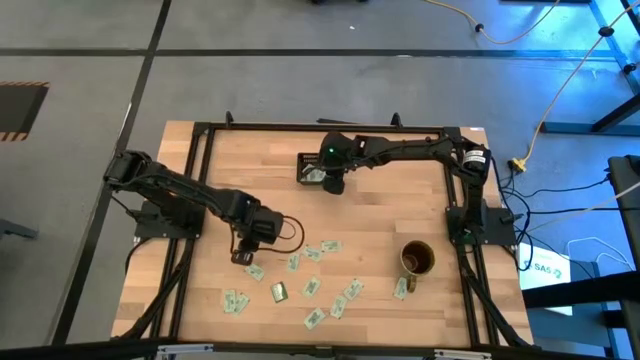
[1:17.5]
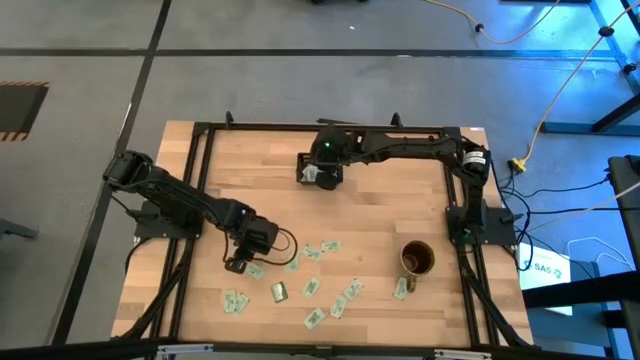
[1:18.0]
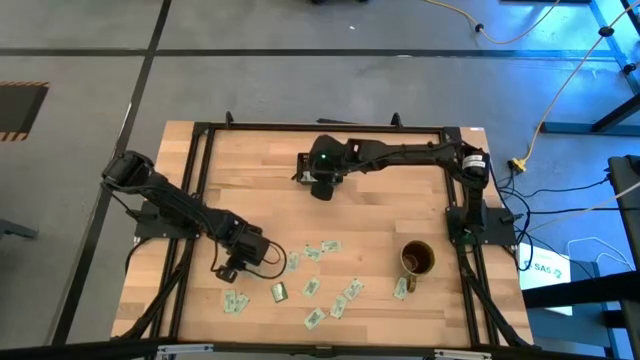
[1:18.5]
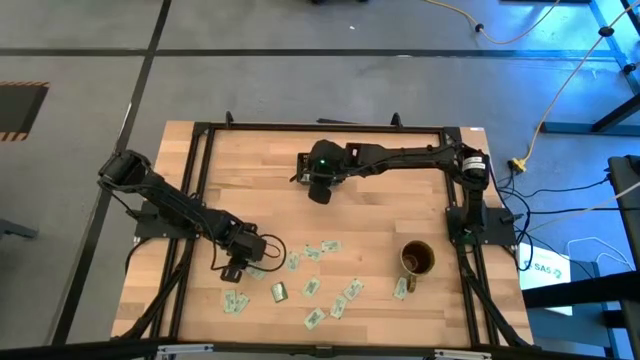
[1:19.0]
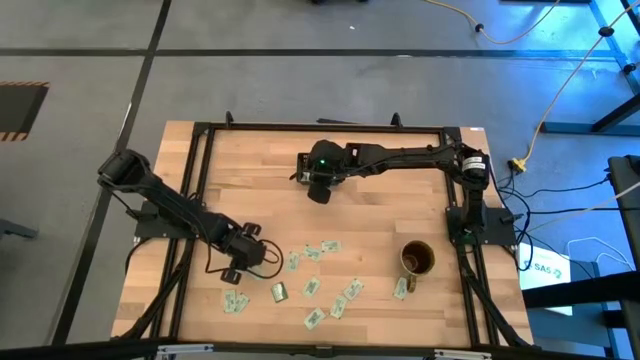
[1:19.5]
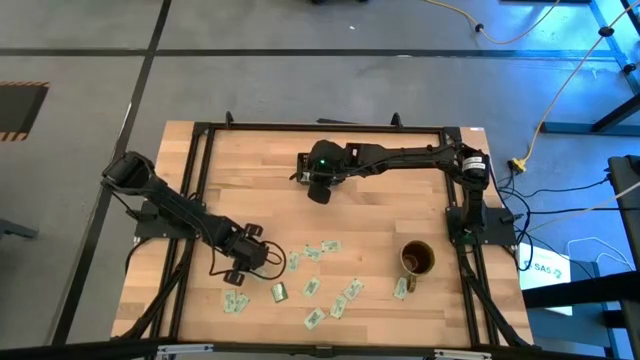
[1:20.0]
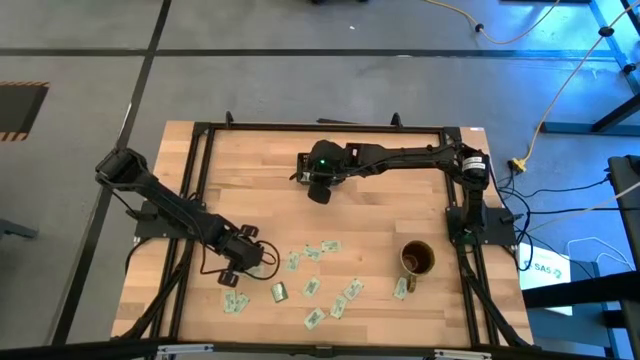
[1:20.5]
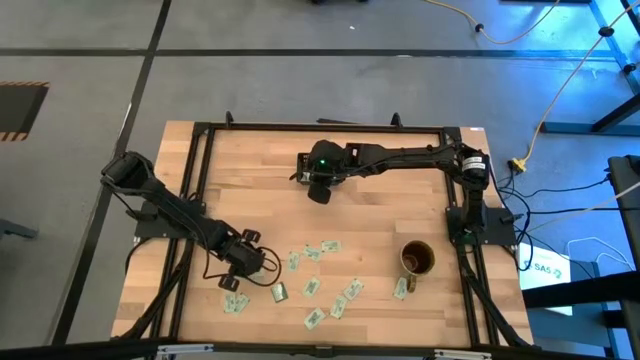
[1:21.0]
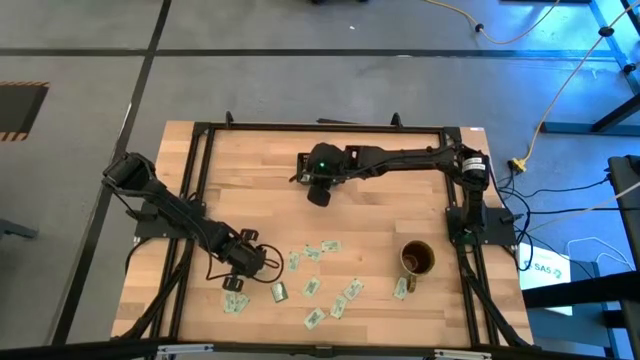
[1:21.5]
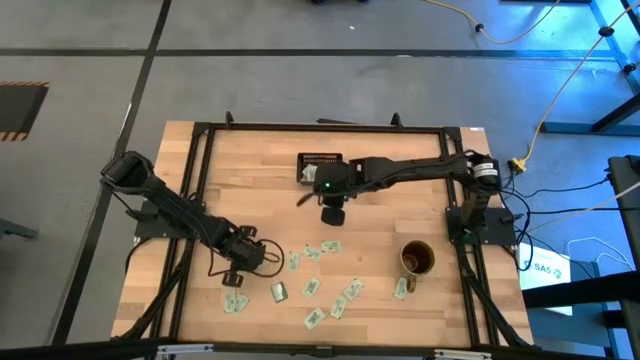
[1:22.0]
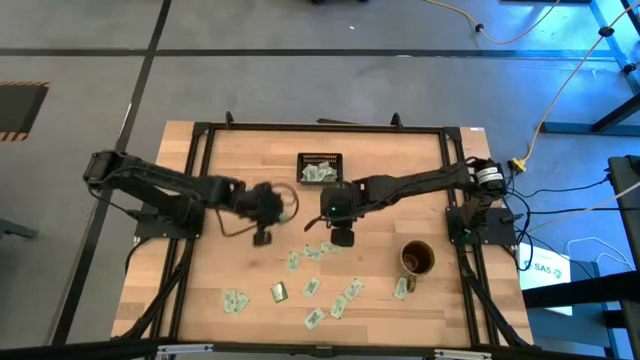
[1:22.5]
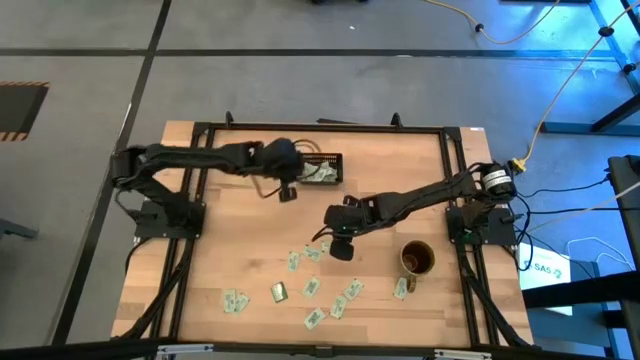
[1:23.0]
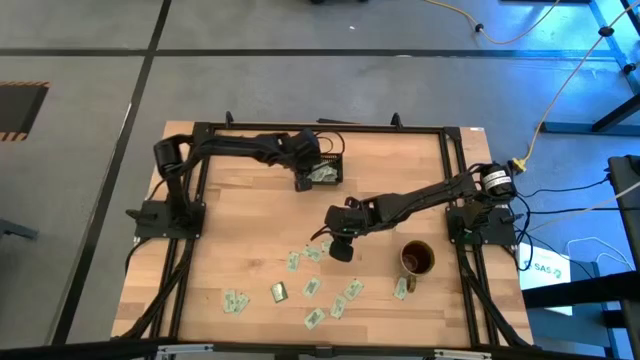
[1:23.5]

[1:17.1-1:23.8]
Task: Pick and place Stevia / Truvia into bins
Put the white stevia packet into the black bin

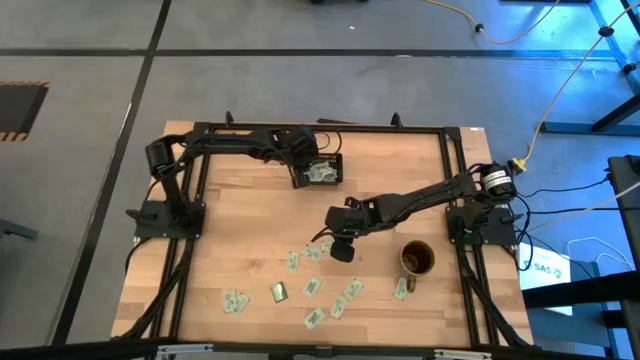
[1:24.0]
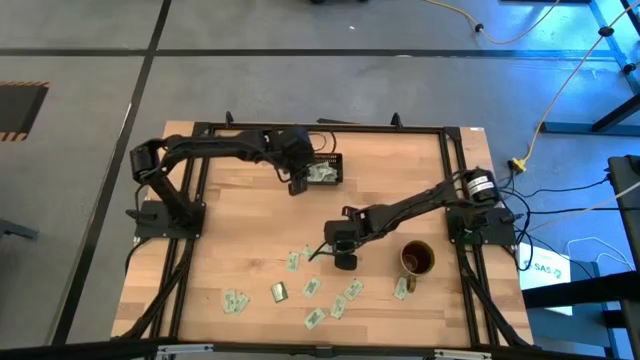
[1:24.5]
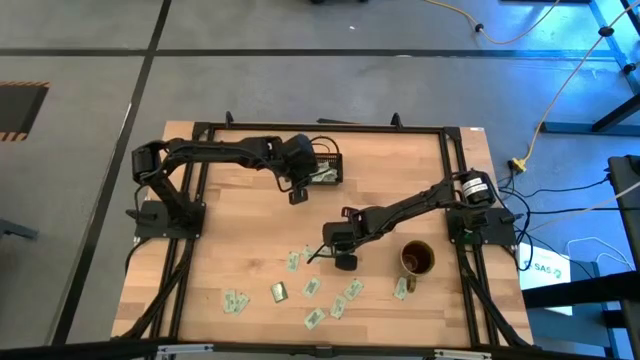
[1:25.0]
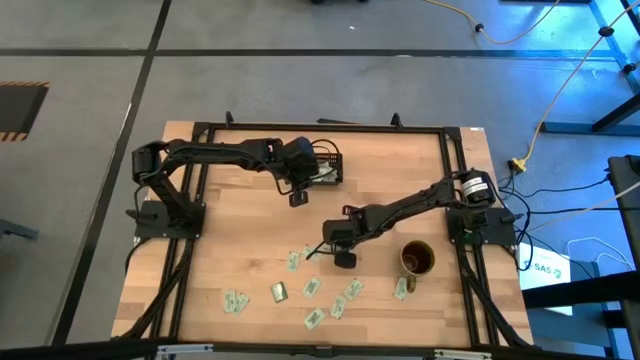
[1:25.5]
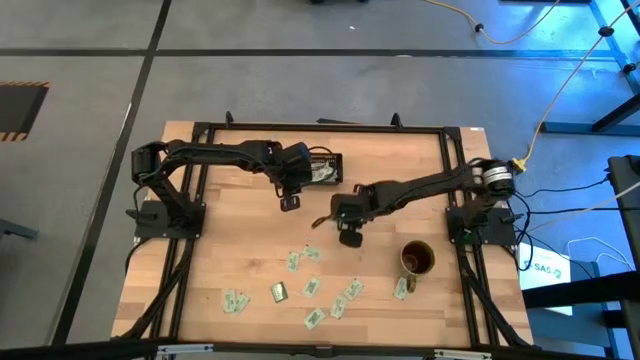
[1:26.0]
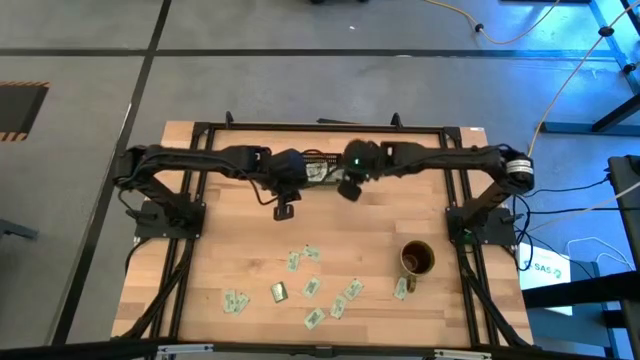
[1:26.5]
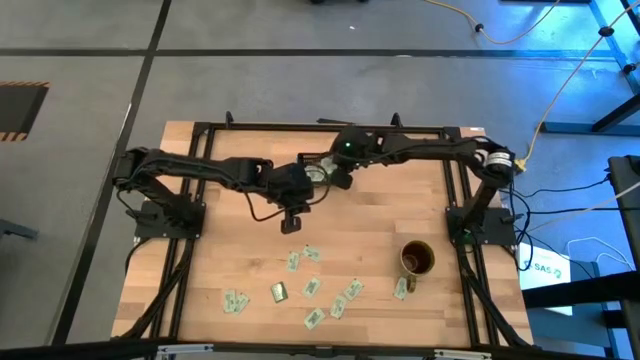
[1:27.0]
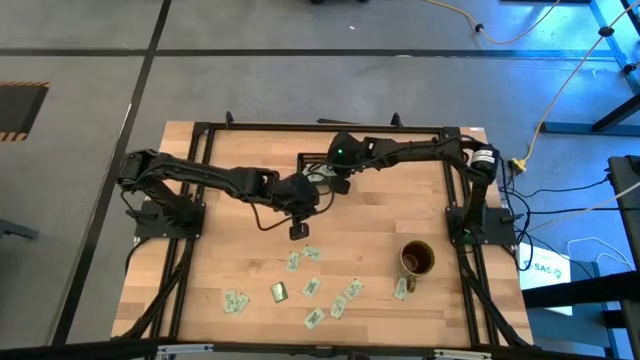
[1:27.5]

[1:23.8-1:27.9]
Put the white stevia packet into the black bin

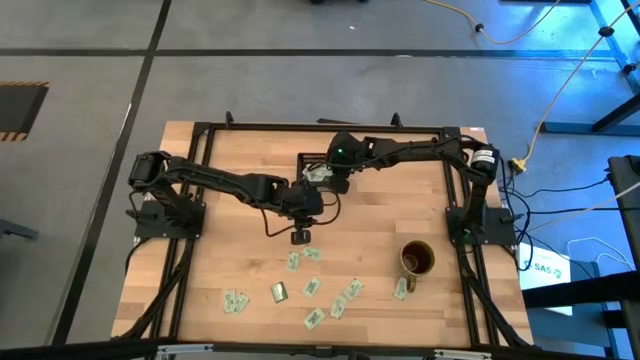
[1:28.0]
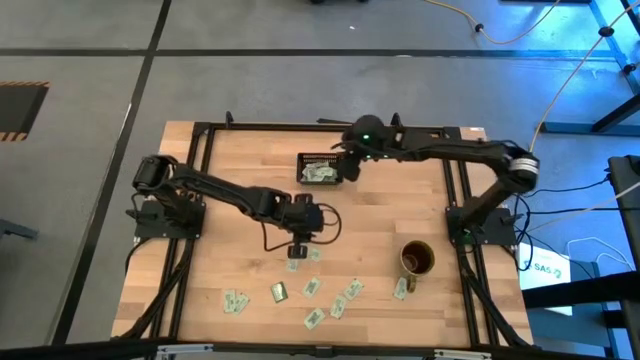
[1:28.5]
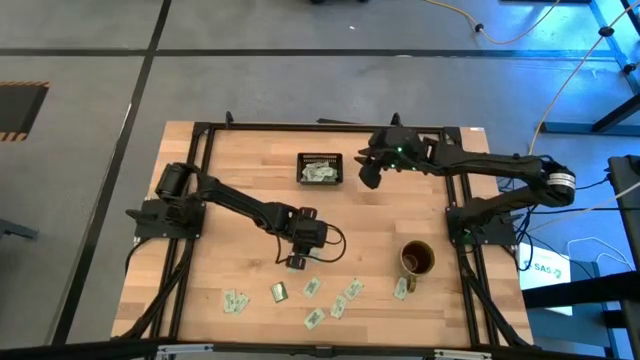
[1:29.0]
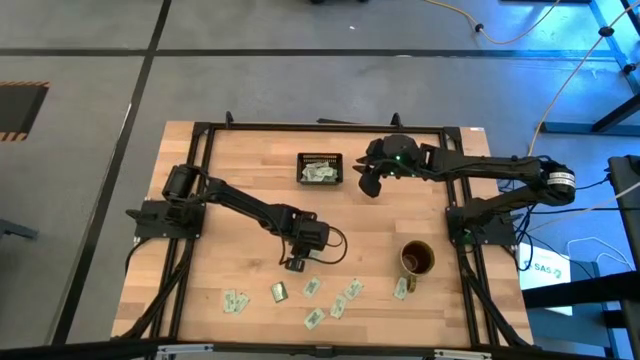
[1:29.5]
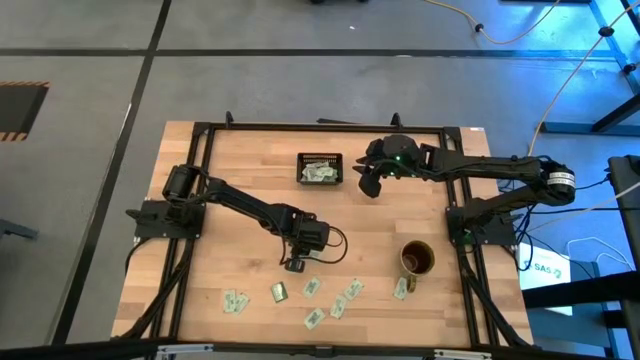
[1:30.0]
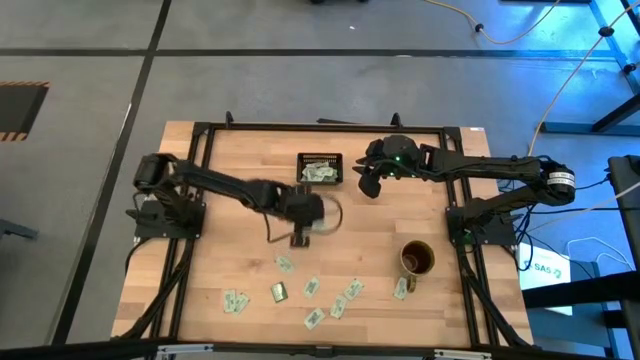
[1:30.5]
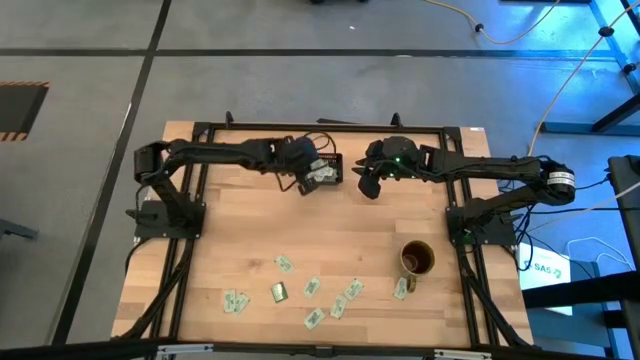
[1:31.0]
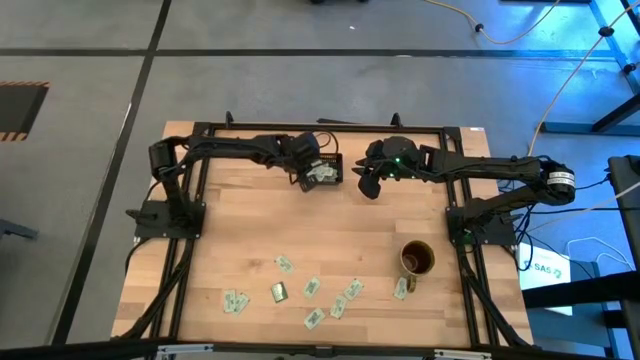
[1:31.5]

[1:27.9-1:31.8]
Put the white stevia packet into the black bin

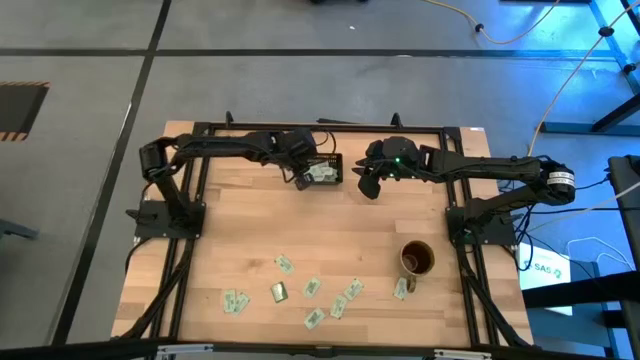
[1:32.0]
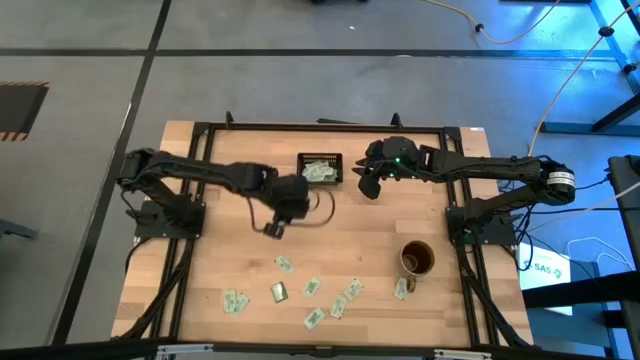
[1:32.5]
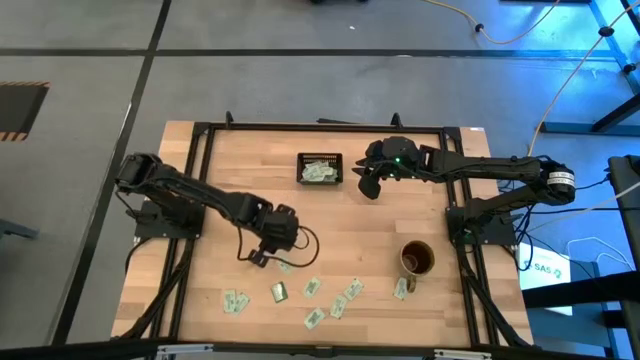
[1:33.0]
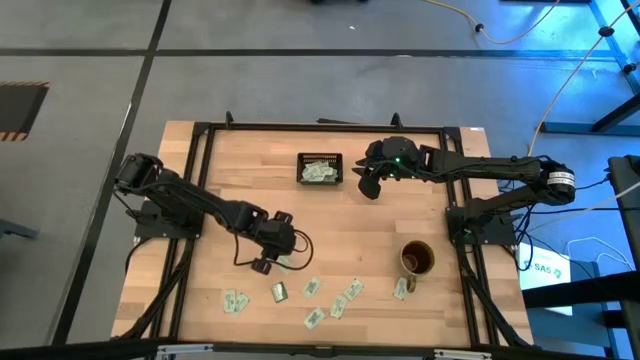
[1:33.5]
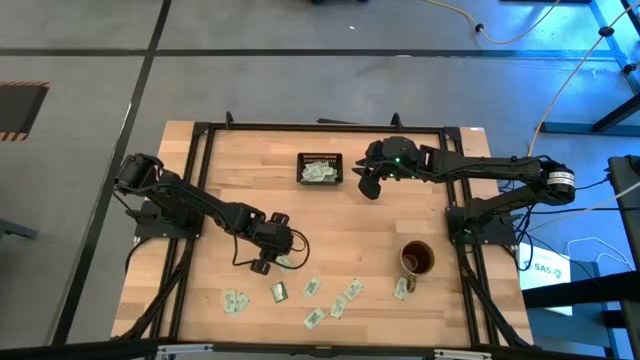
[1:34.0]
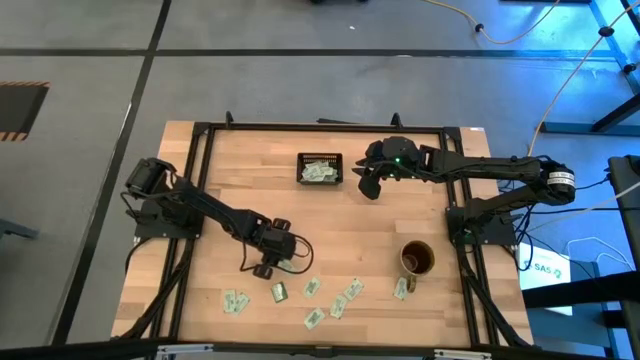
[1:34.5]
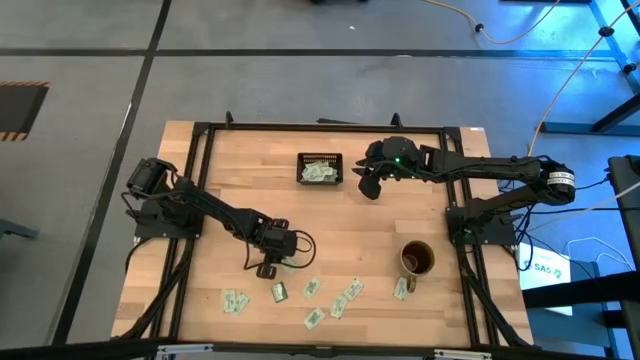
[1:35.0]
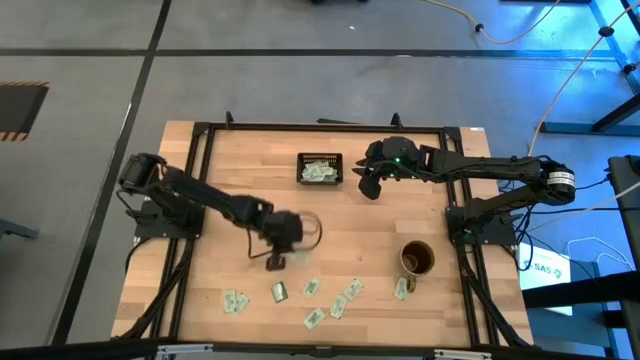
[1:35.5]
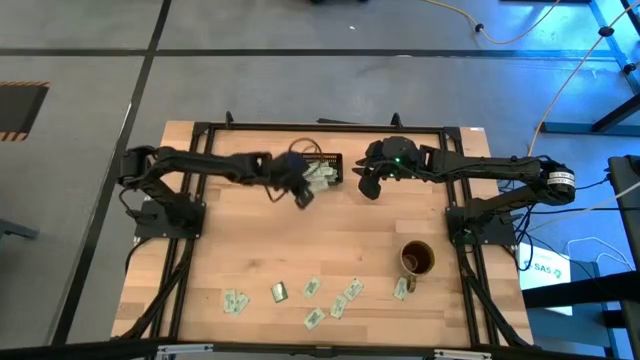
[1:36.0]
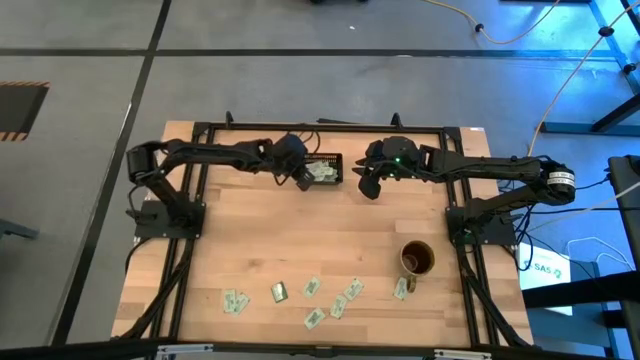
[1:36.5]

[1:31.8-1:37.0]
Put the white stevia packet into the black bin

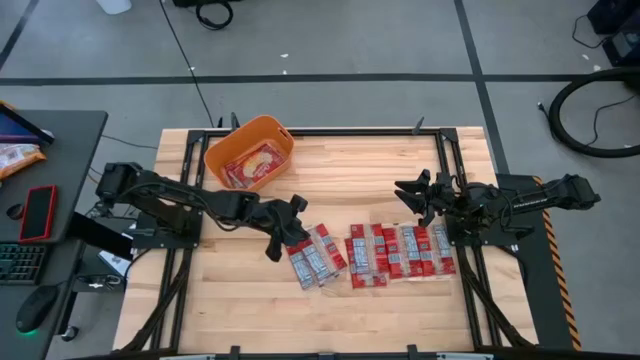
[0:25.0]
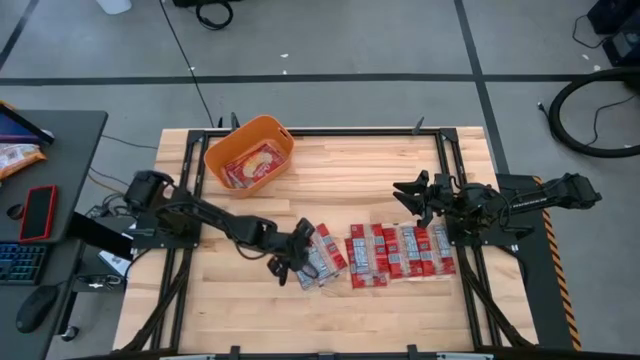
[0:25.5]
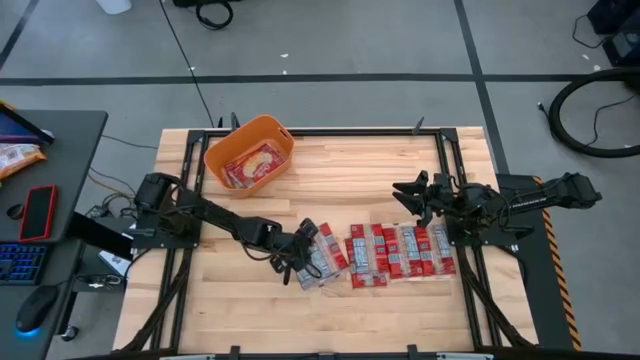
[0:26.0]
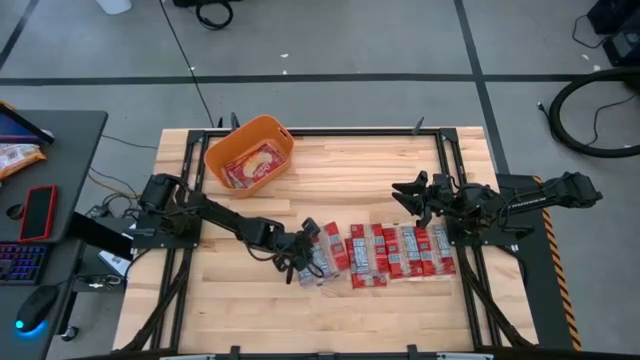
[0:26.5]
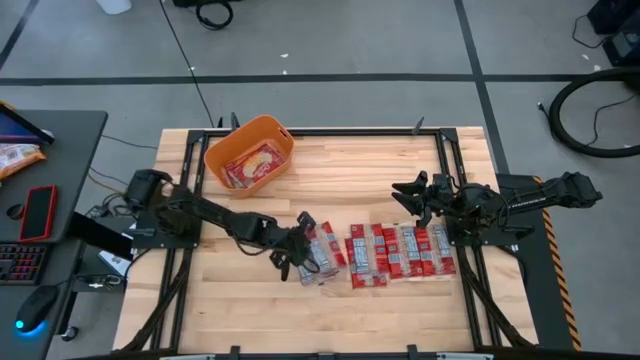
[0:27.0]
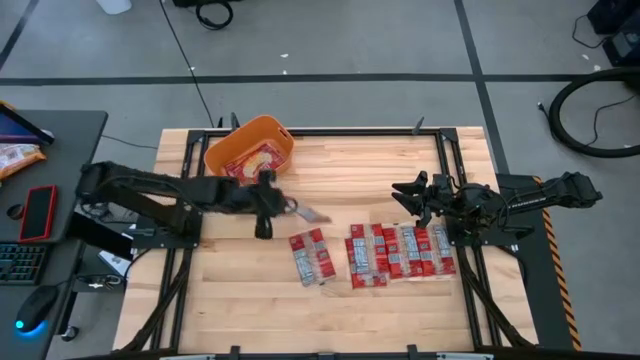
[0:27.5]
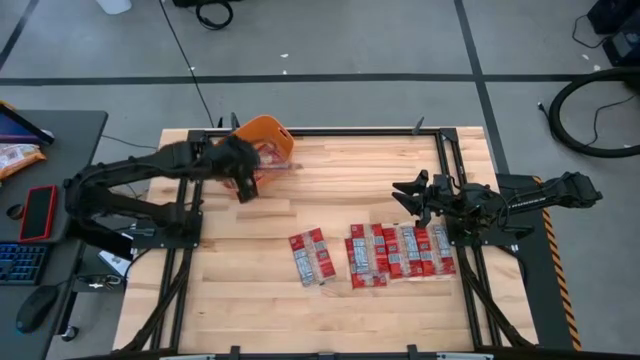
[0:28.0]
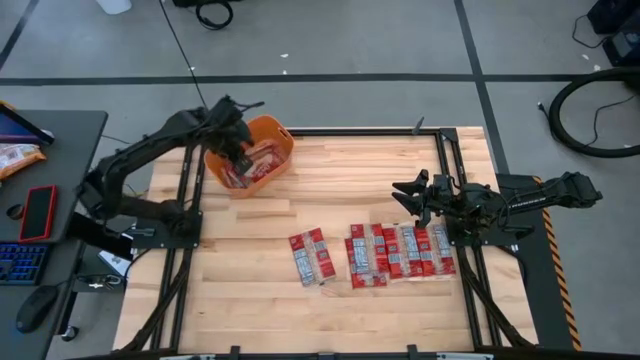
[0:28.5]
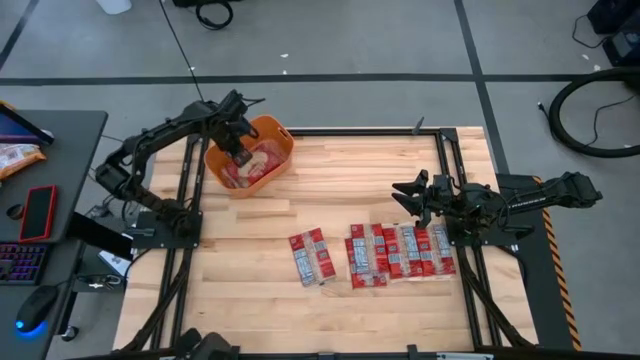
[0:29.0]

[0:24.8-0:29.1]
Task: Sort popcorn bags into baskets
Put the red popcorn bag into the orange container
